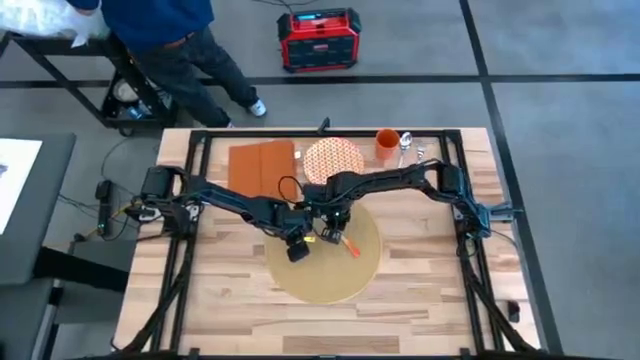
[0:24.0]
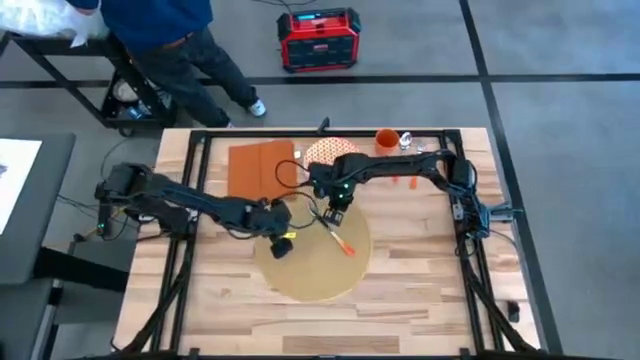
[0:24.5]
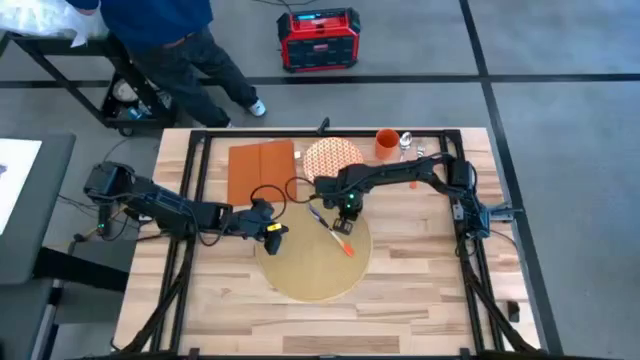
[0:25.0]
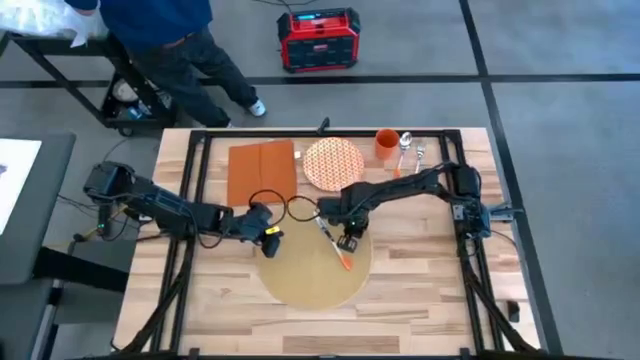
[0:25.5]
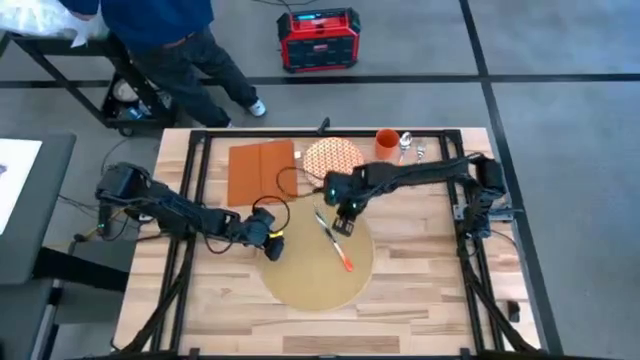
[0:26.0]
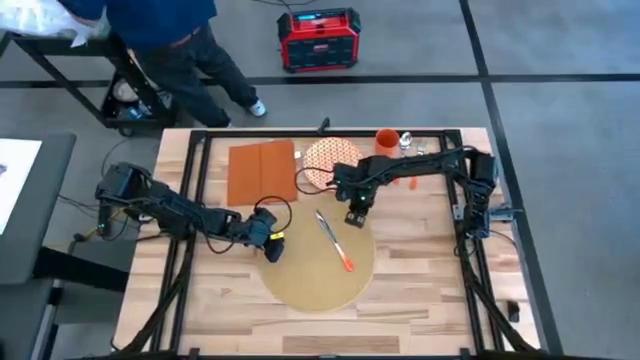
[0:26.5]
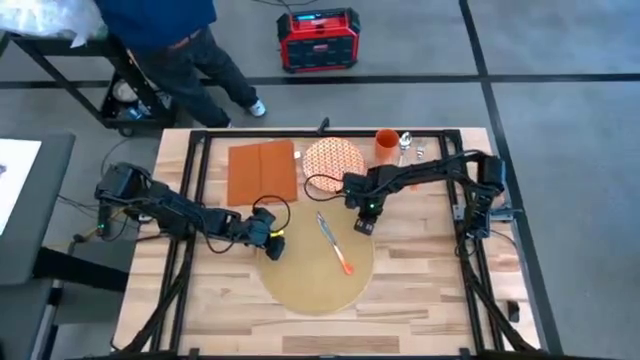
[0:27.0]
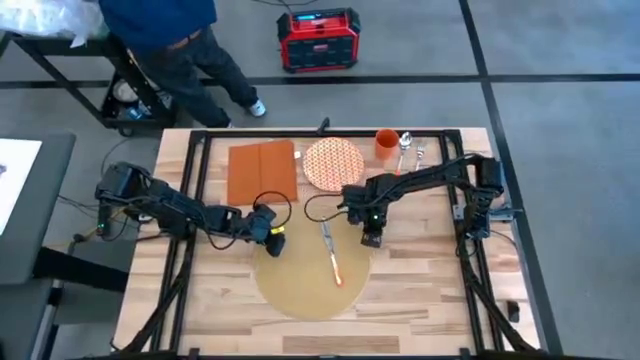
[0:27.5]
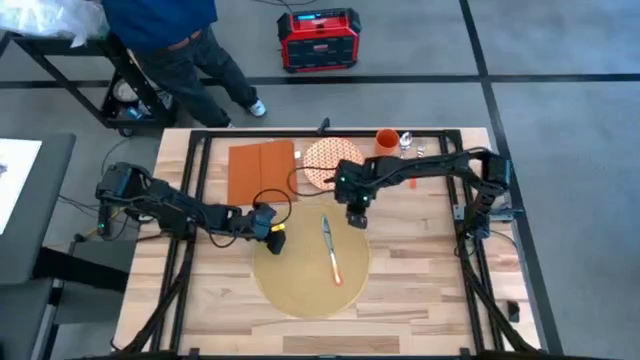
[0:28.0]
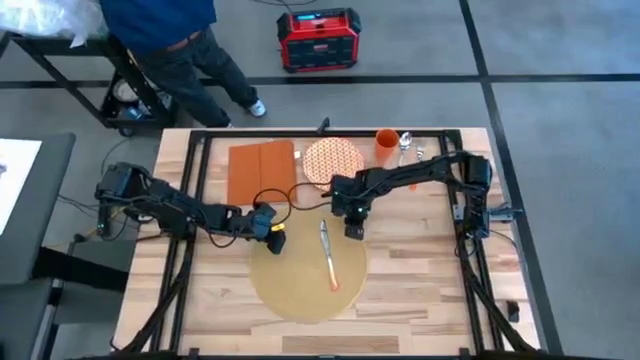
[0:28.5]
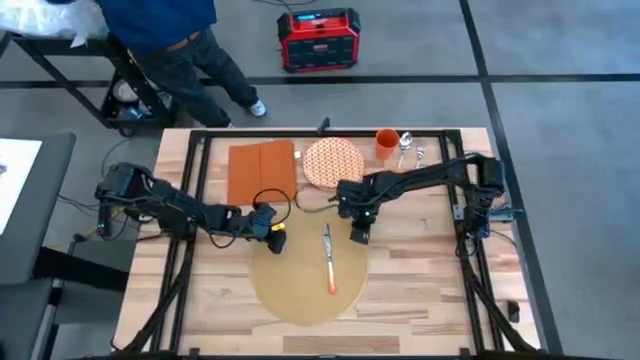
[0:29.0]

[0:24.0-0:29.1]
Task: Set table place
Adjust the placemat

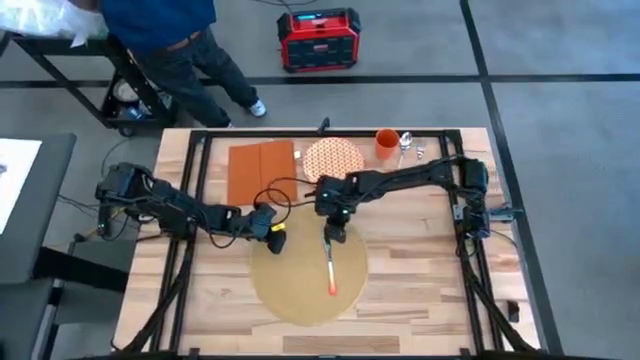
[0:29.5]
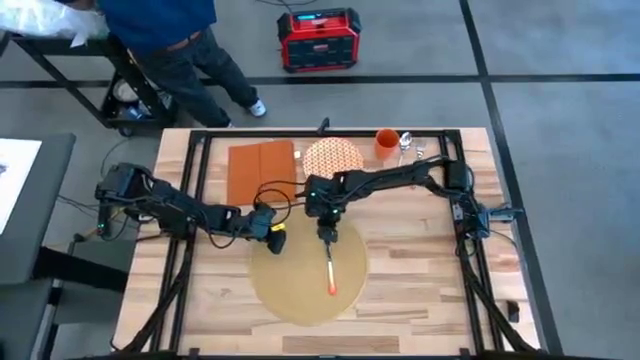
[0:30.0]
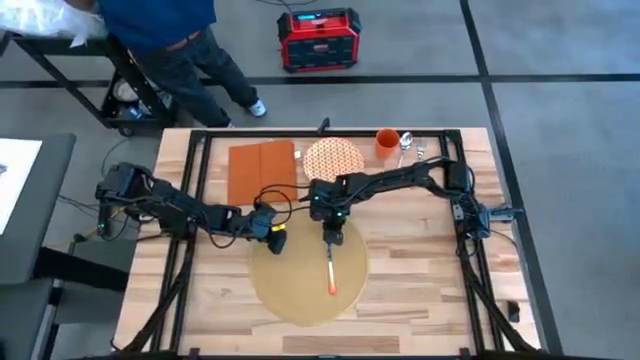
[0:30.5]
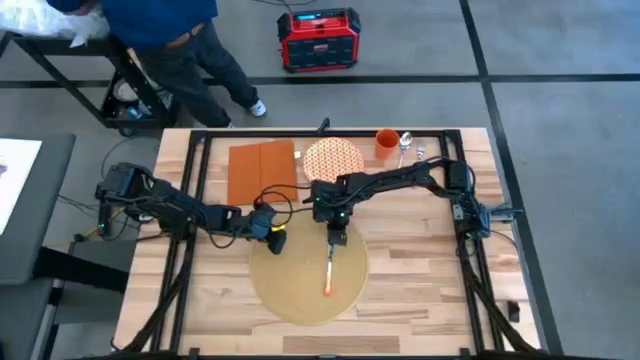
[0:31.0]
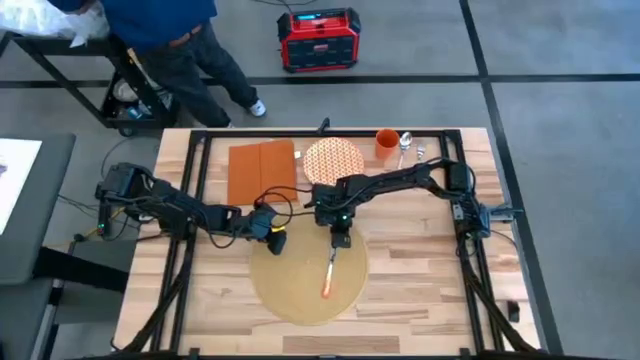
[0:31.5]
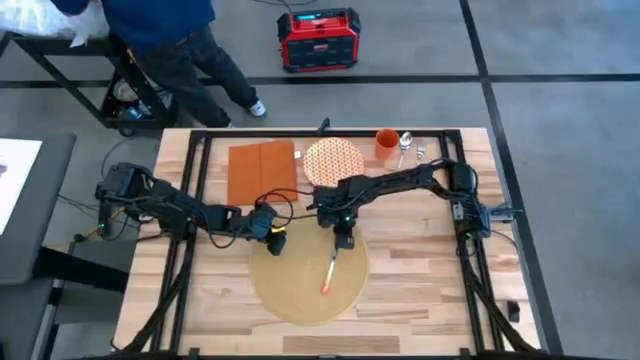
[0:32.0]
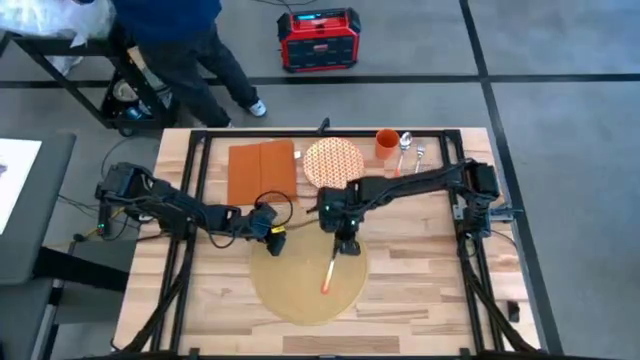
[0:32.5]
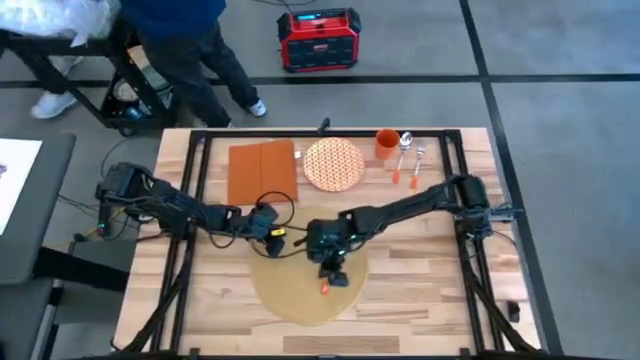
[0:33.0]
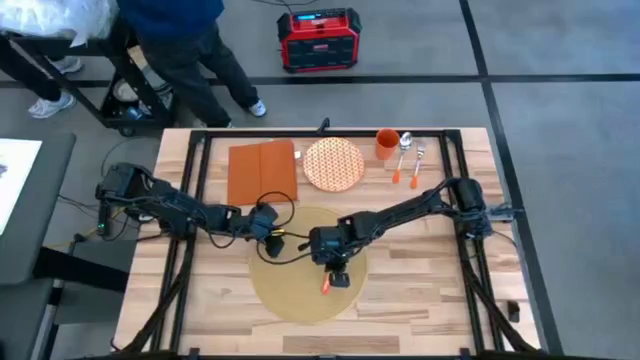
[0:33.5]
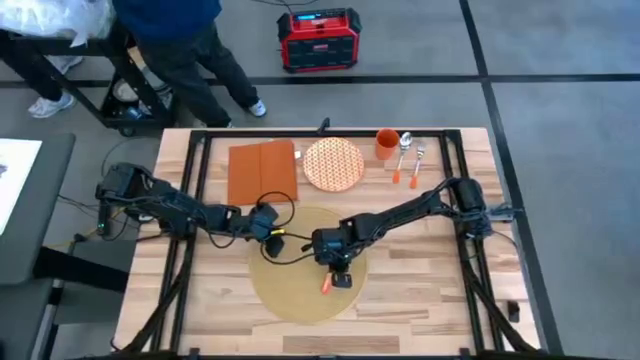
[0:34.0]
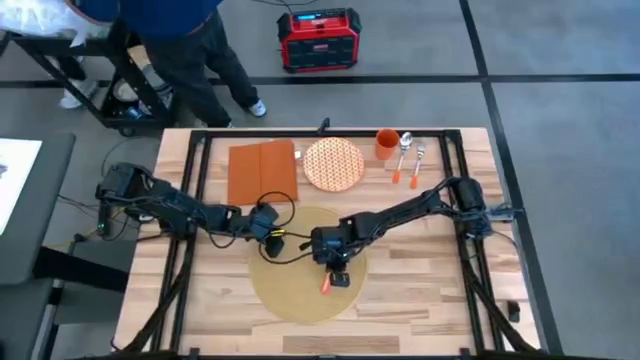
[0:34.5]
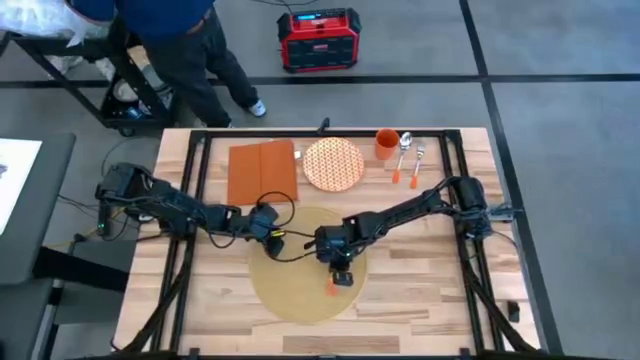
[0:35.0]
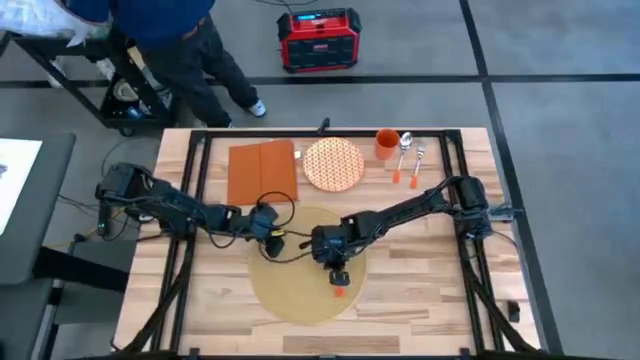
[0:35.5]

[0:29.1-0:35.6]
Adjust the orange knife on the brown placemat

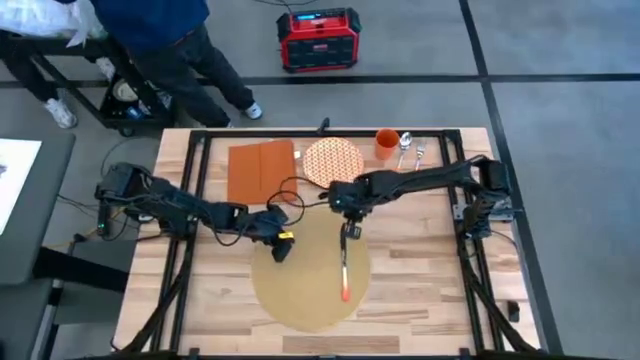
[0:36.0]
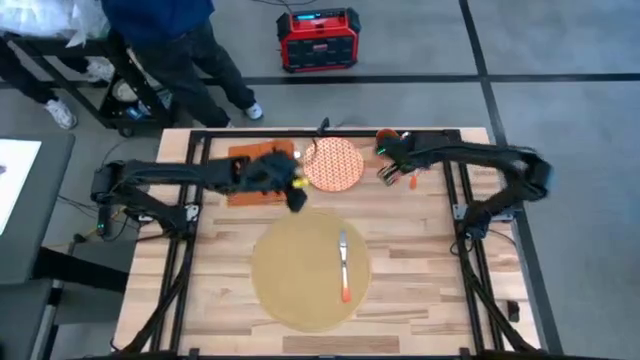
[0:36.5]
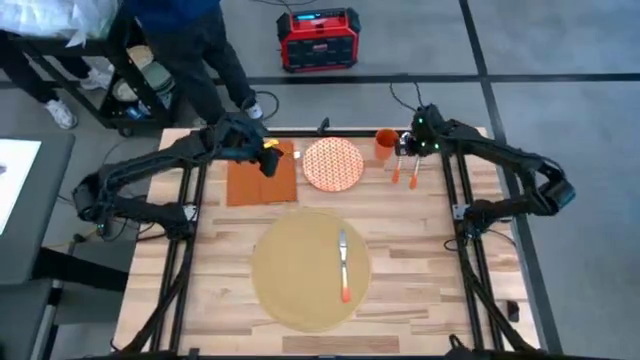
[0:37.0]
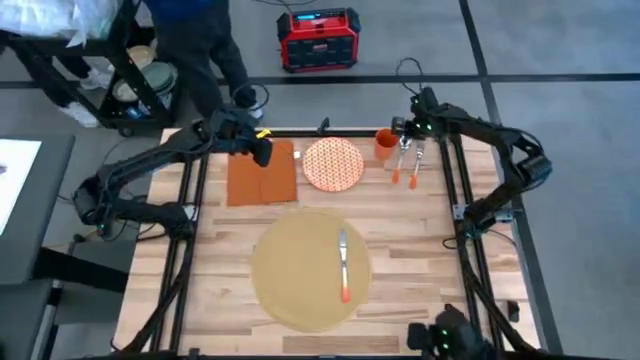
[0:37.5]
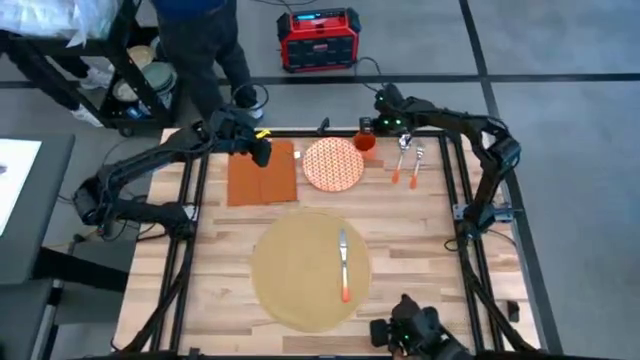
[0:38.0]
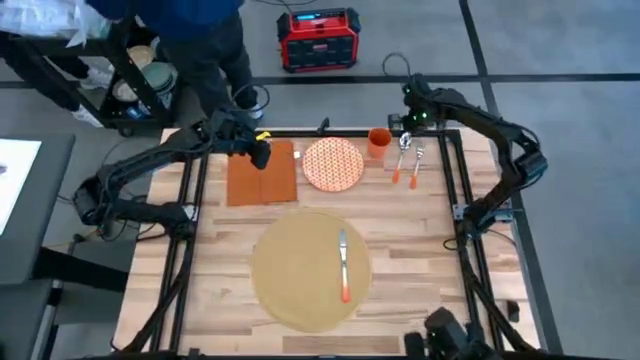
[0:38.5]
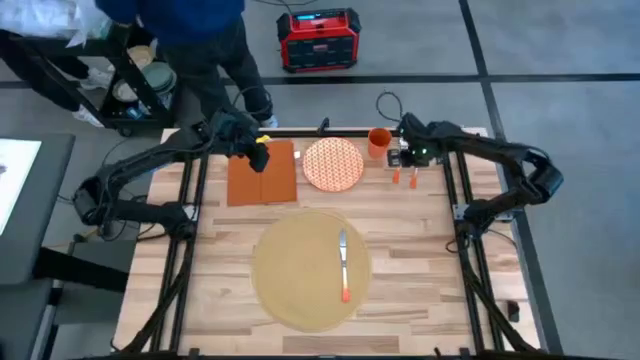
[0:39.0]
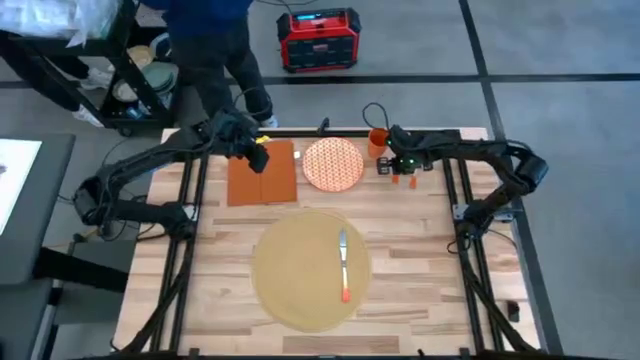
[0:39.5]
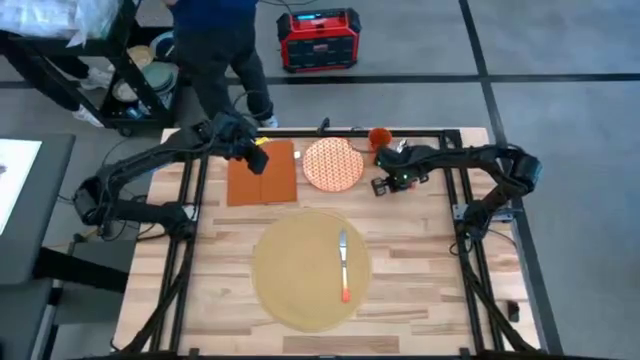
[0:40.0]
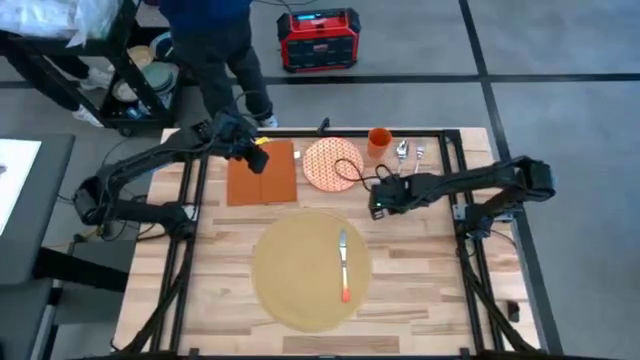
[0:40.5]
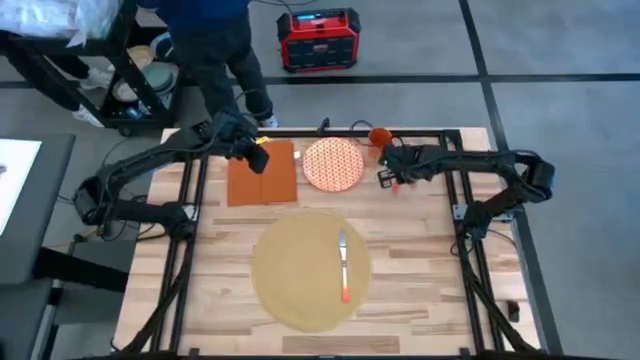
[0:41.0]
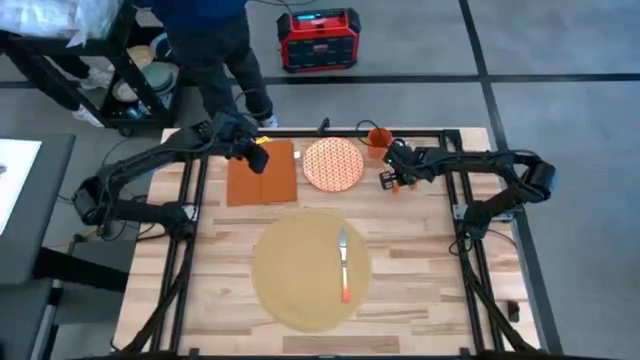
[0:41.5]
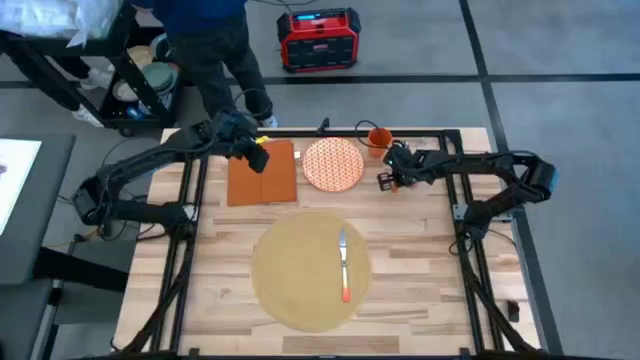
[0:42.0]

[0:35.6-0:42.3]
Put the orange spoon on the brown placemat on the right of the orange knife

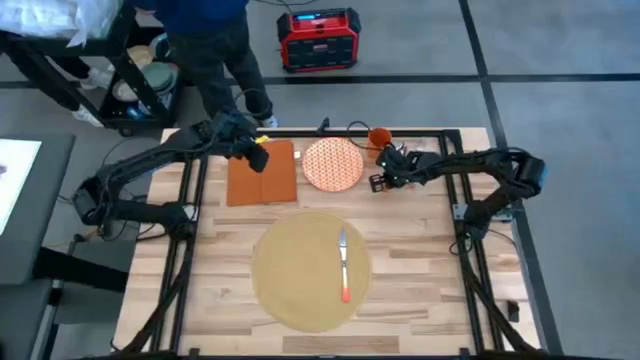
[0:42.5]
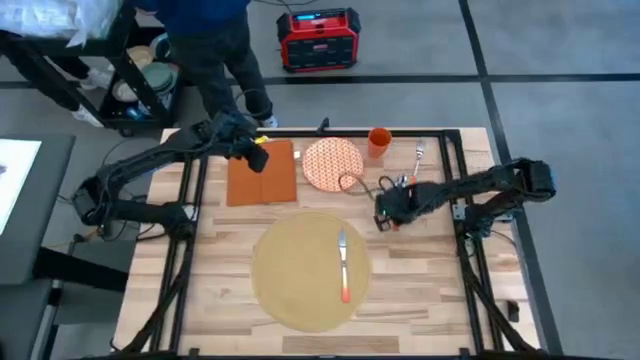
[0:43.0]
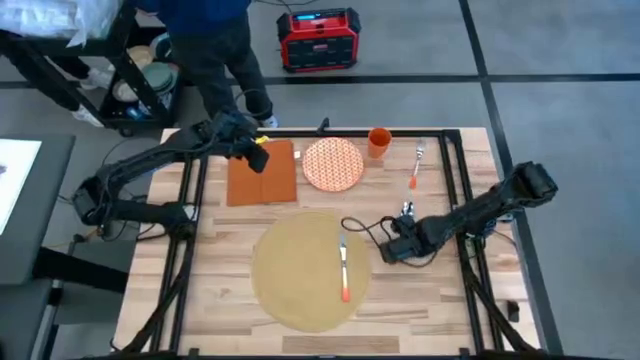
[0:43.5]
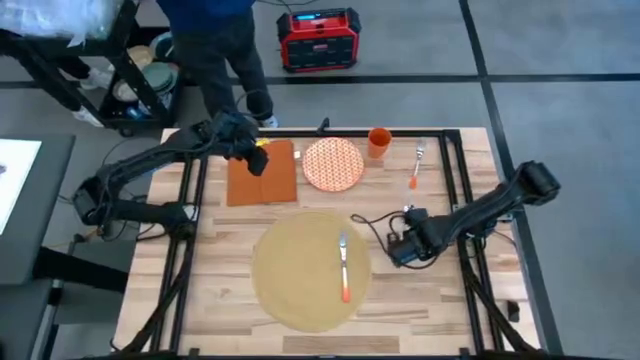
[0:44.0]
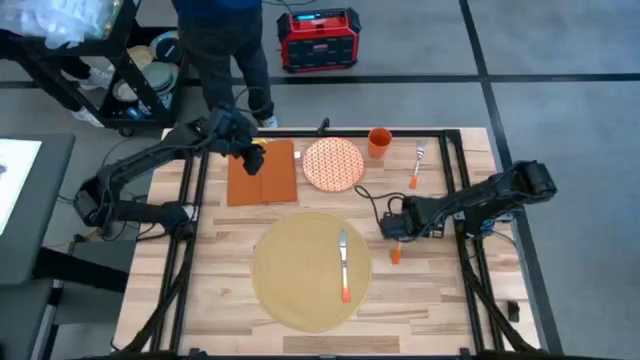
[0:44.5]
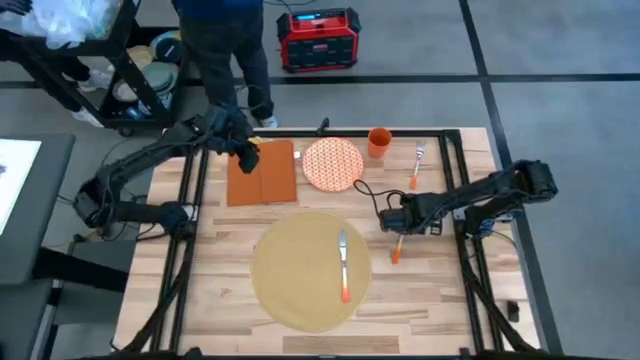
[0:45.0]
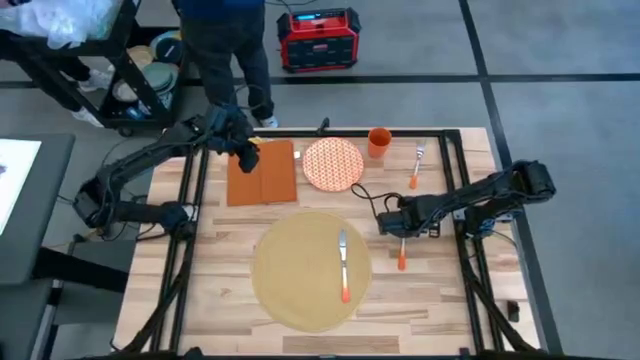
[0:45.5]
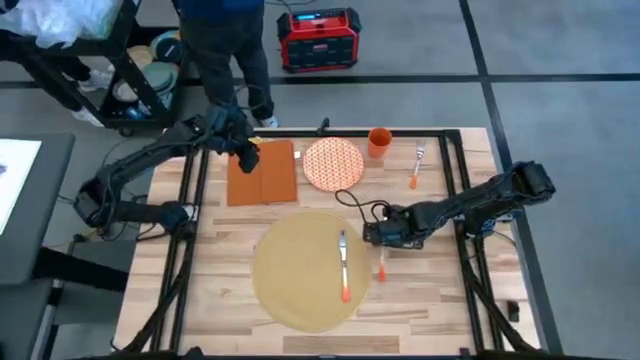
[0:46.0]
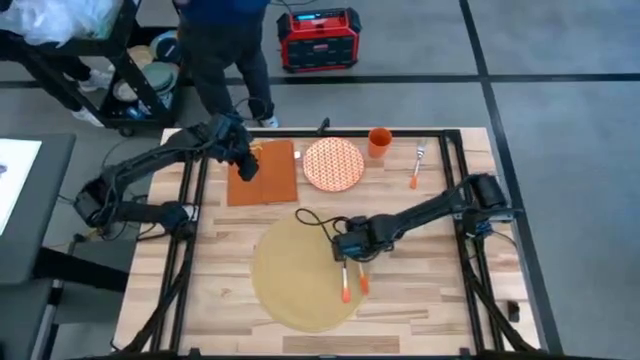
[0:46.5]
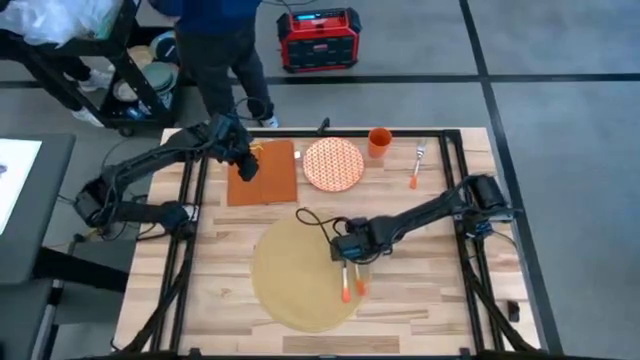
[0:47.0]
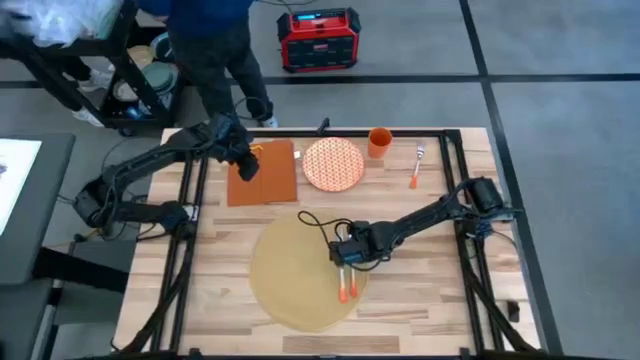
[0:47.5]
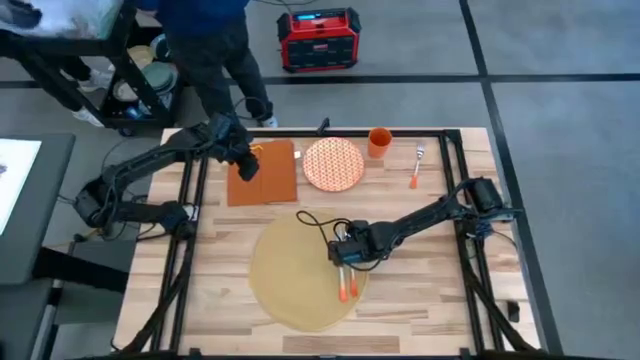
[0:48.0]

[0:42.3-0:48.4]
Put the orange spoon on the brown placemat on the right of the orange knife
